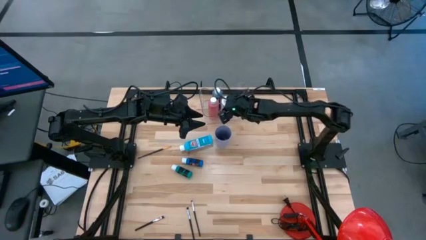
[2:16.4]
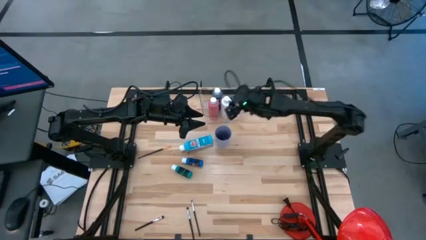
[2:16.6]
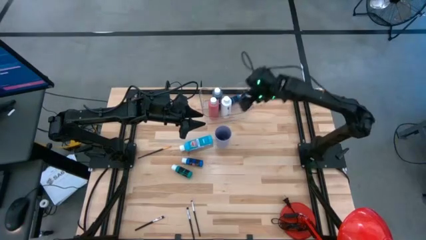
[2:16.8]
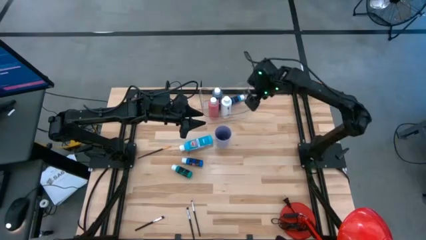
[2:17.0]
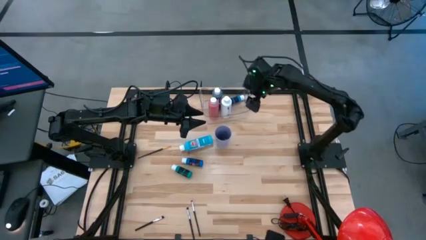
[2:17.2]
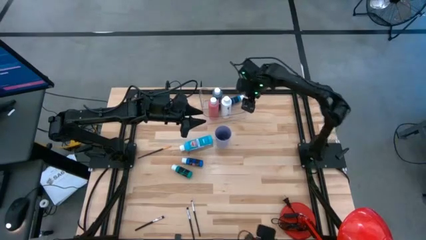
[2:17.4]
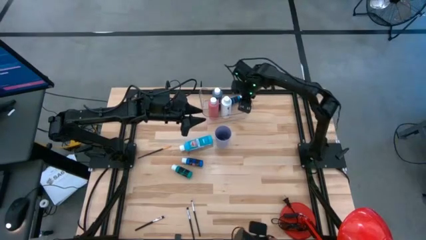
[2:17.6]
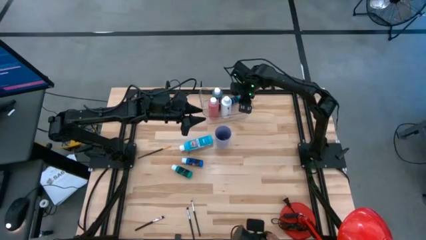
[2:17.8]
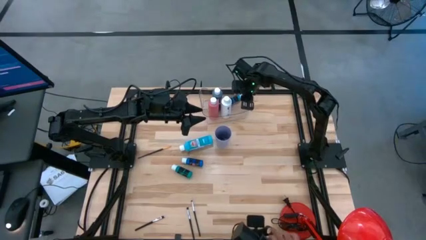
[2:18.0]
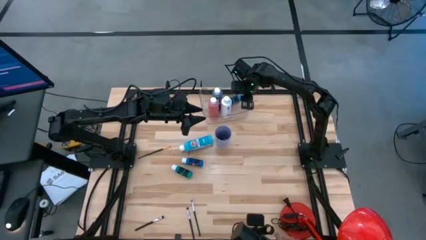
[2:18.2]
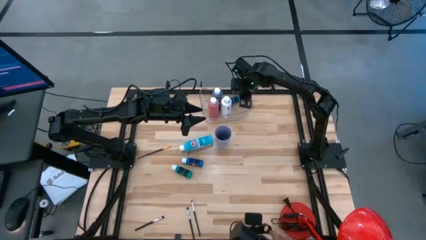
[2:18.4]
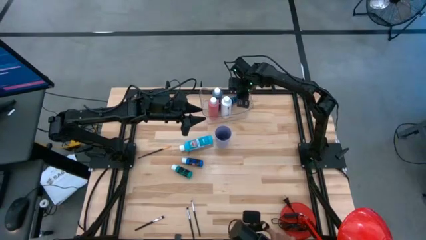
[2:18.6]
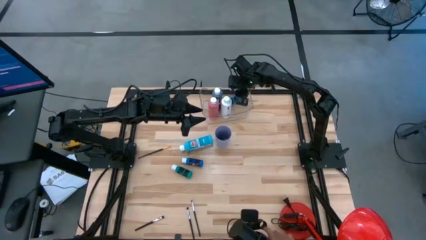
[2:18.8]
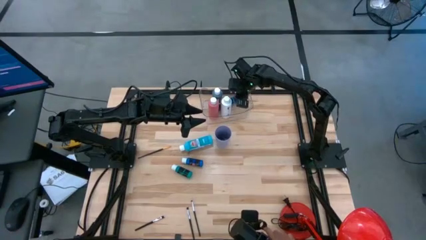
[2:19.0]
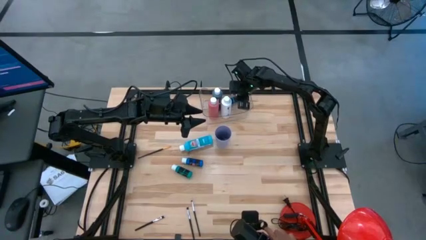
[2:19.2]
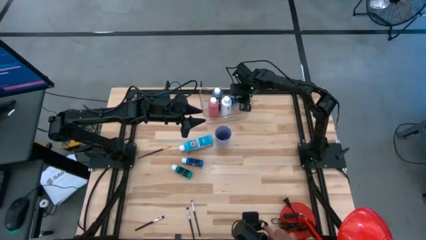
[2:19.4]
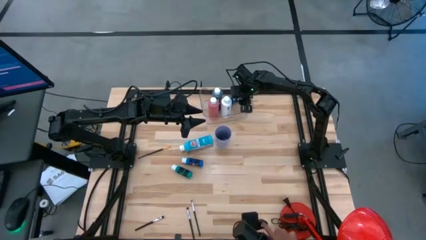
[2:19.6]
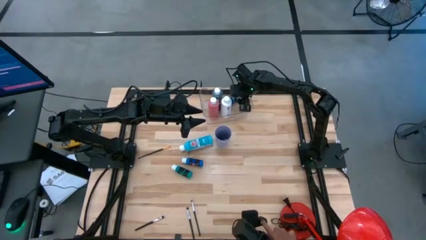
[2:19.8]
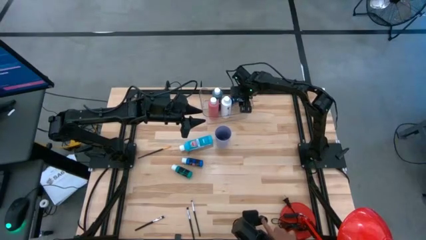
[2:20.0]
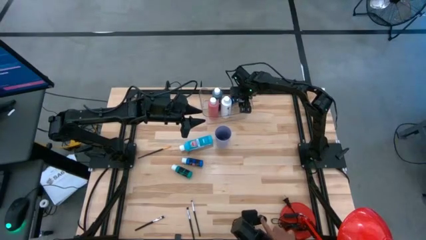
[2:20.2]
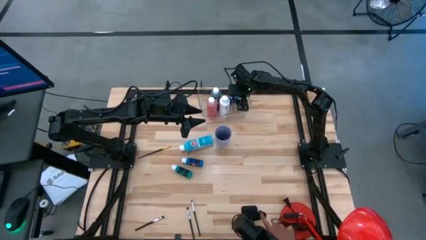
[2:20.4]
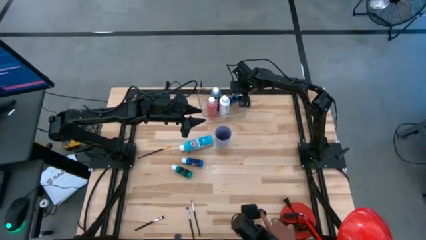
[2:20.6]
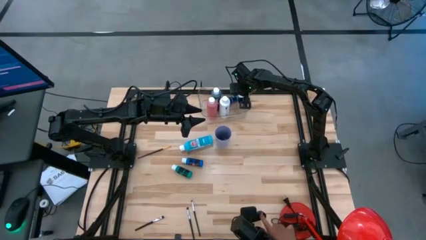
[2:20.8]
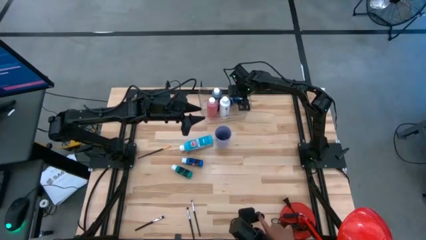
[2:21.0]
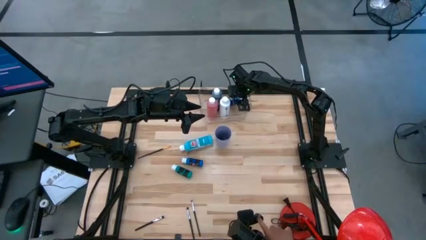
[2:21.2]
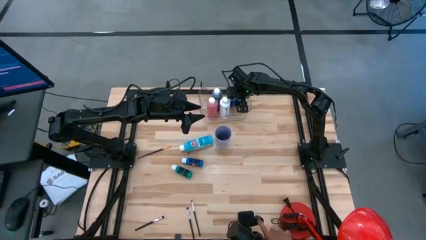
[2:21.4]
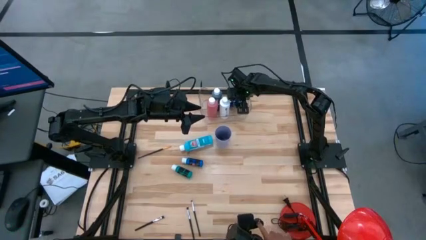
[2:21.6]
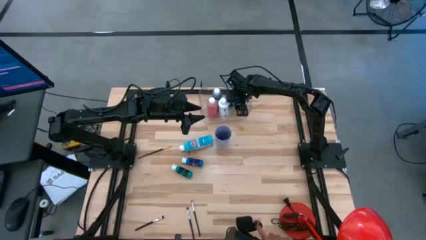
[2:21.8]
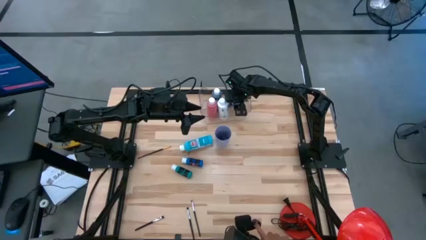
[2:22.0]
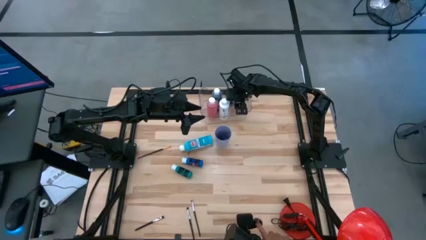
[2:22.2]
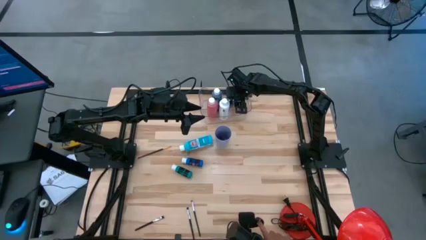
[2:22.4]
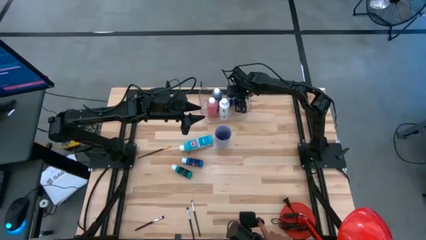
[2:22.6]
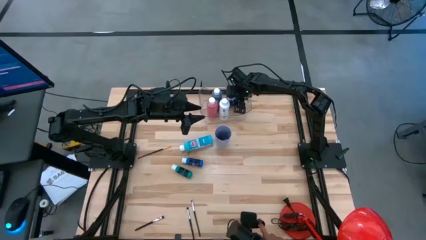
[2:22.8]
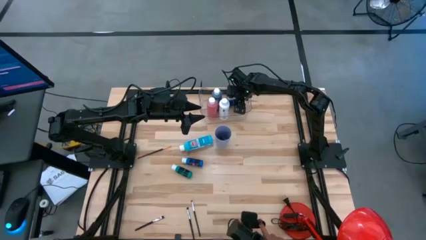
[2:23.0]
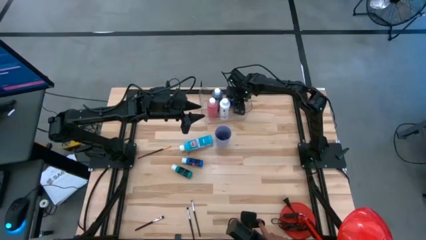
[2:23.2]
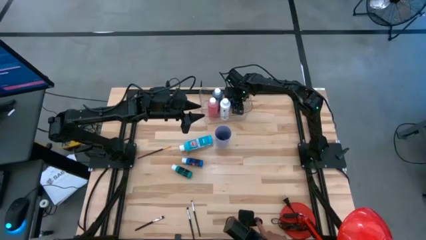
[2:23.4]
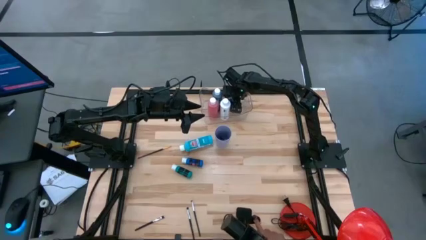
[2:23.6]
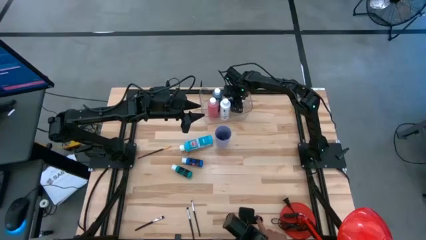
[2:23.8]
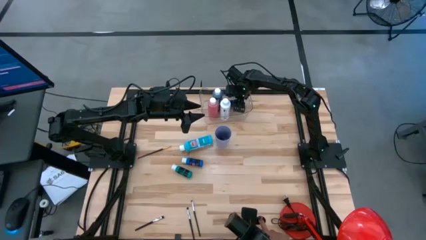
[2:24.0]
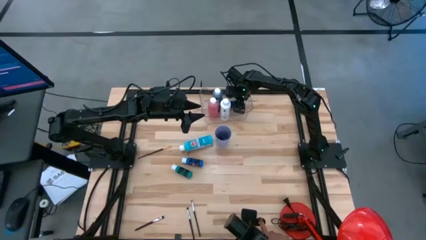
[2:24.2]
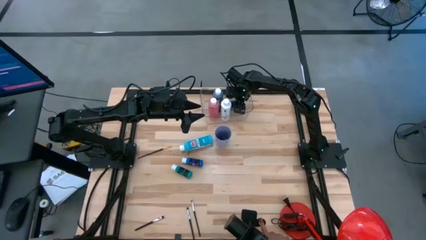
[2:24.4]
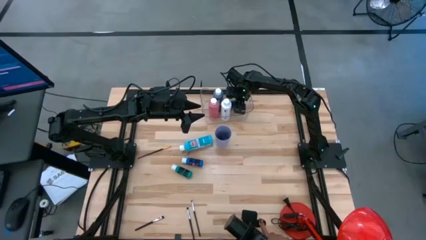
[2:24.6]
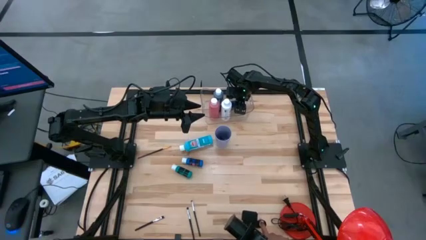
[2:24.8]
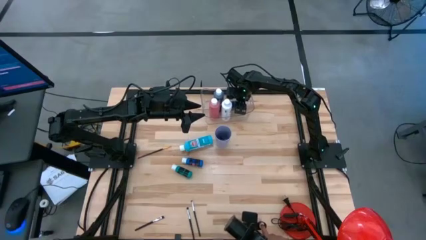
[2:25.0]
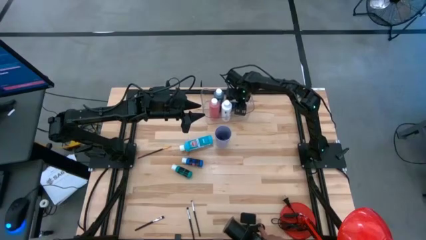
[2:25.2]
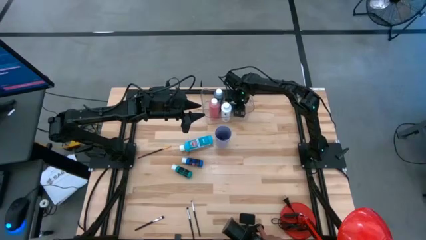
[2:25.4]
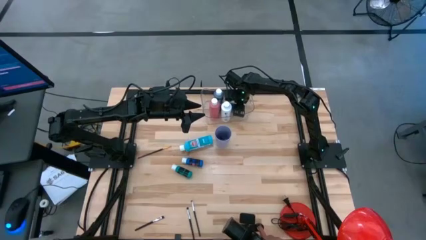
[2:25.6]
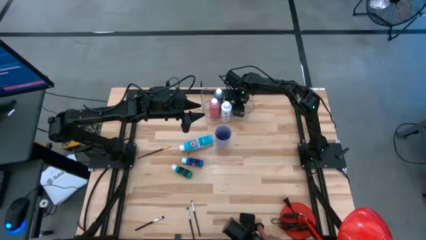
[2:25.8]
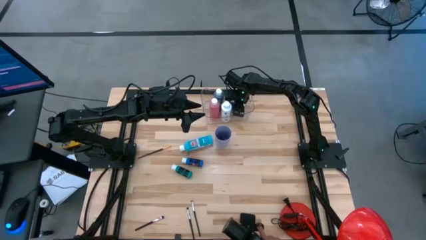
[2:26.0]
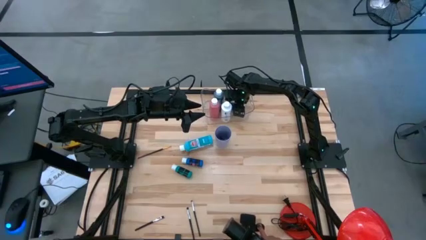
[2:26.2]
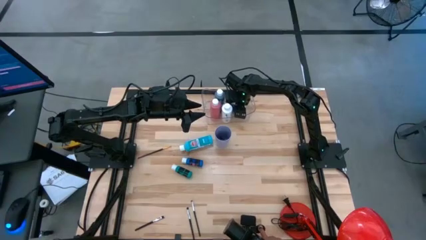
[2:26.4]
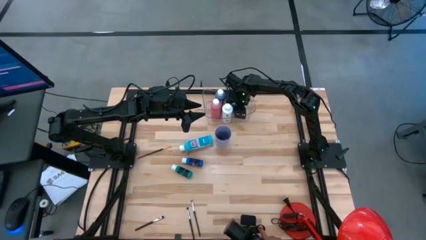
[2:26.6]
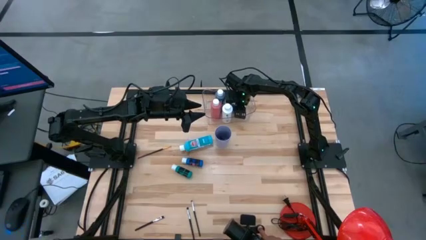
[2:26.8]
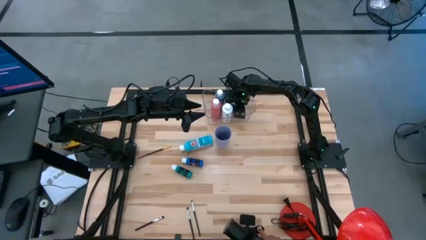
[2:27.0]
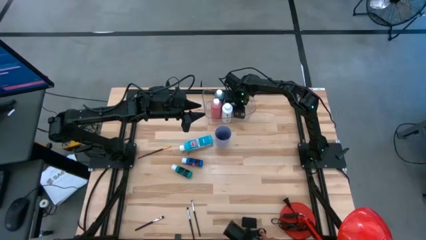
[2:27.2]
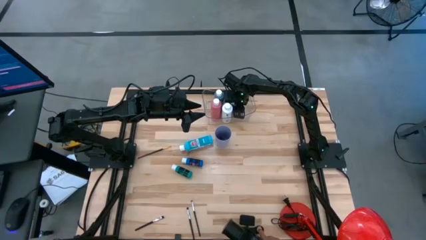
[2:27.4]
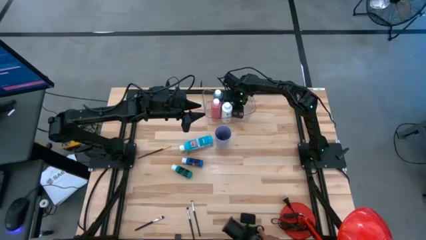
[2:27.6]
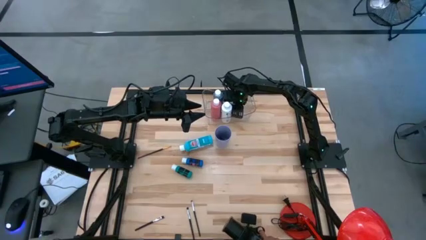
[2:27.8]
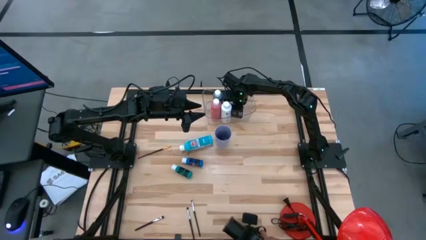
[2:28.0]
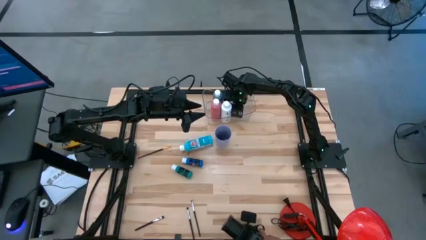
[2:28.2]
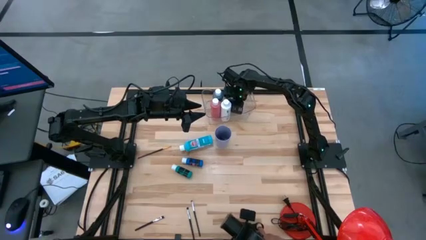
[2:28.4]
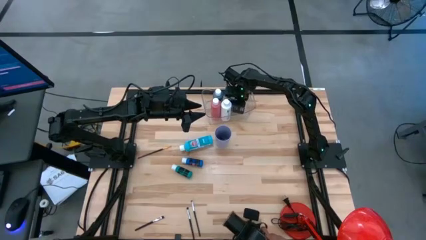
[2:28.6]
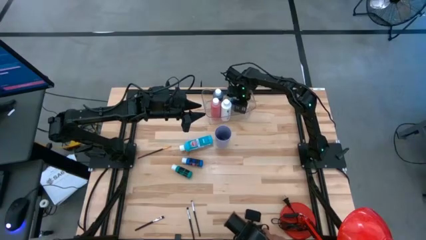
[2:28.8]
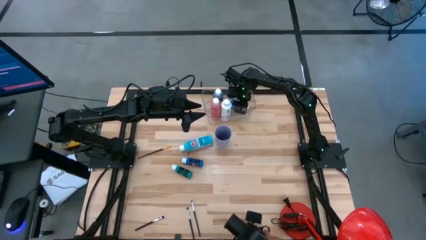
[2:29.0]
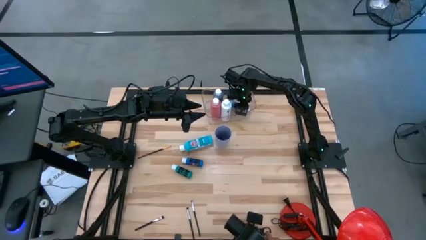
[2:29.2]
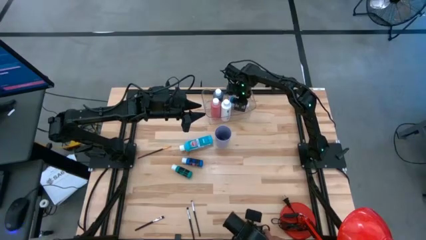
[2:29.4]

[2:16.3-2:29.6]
Task: Pick & Place Paint Supplies
Adjust the blue paint bottle in the transparent bin

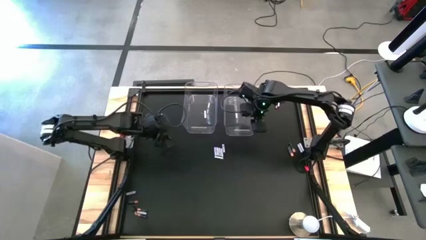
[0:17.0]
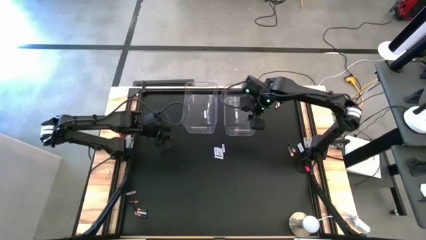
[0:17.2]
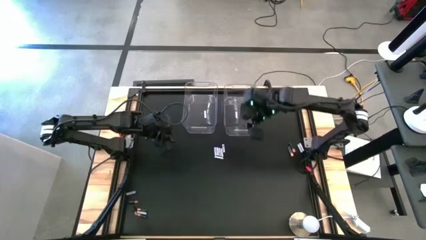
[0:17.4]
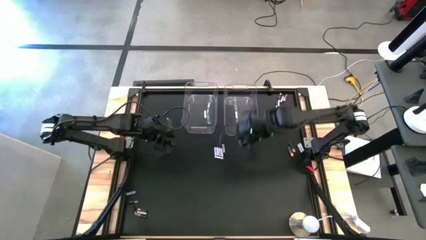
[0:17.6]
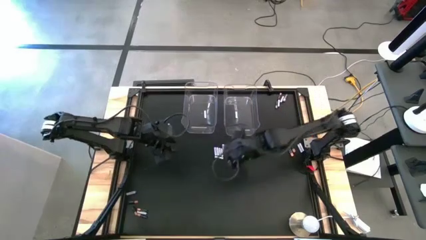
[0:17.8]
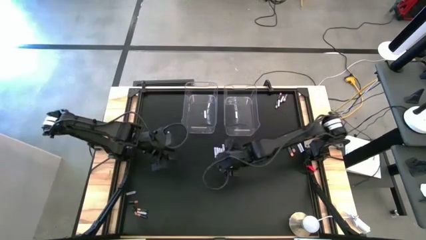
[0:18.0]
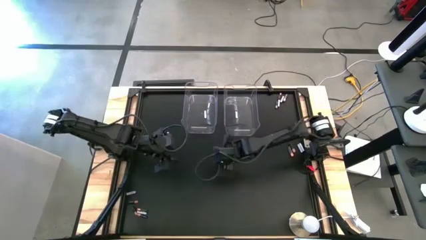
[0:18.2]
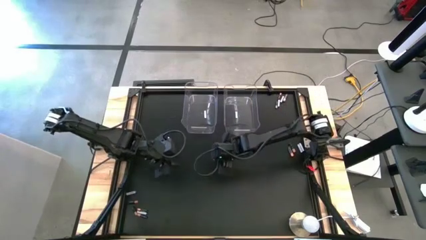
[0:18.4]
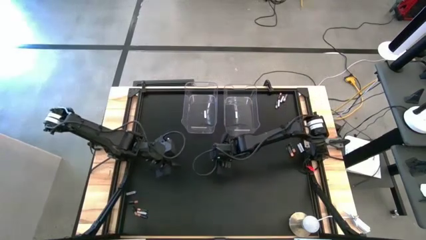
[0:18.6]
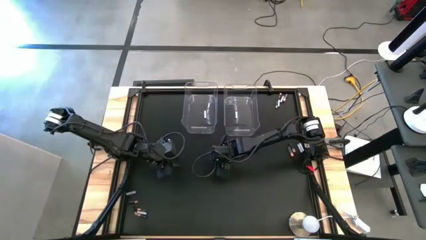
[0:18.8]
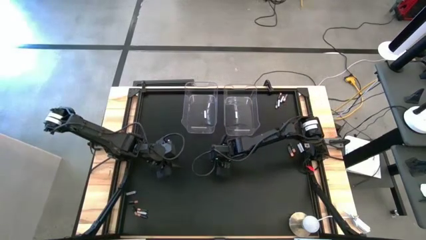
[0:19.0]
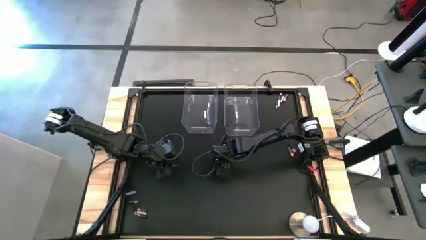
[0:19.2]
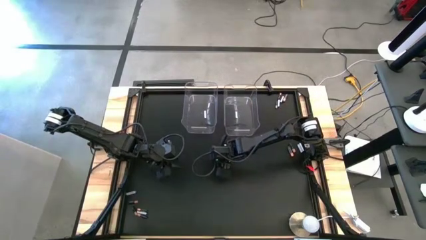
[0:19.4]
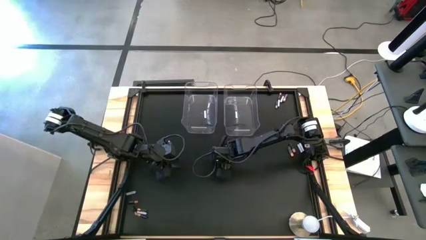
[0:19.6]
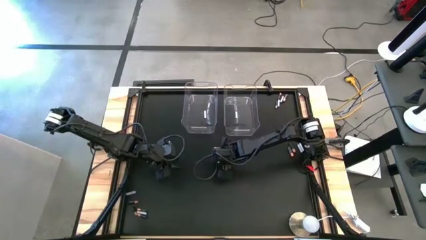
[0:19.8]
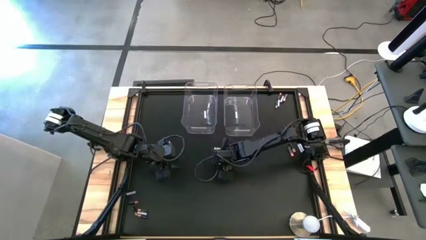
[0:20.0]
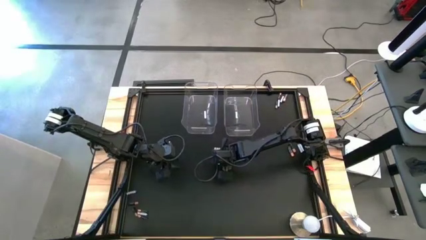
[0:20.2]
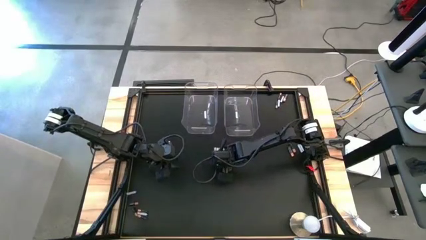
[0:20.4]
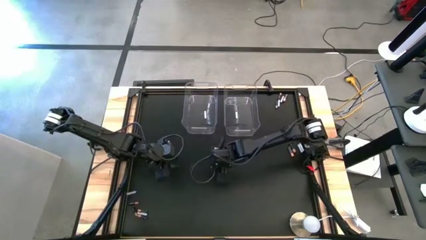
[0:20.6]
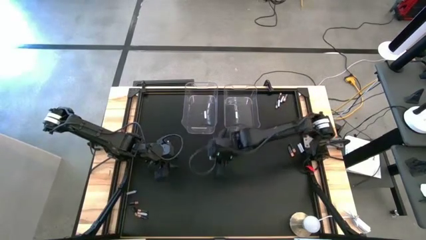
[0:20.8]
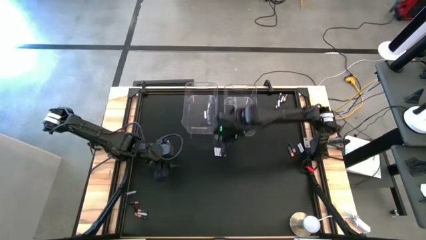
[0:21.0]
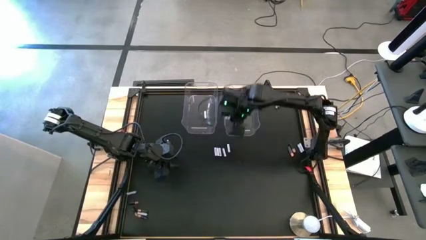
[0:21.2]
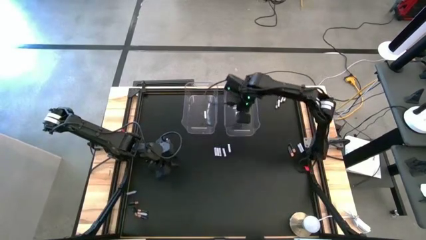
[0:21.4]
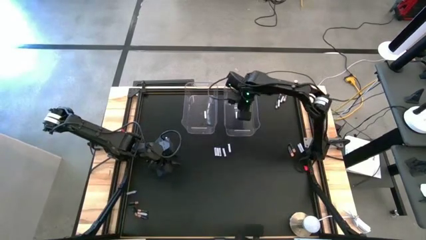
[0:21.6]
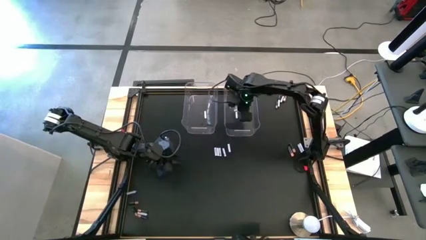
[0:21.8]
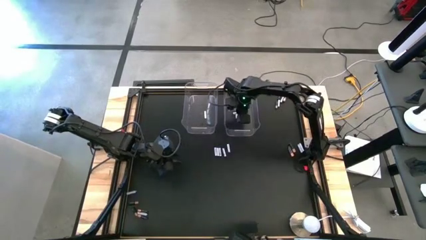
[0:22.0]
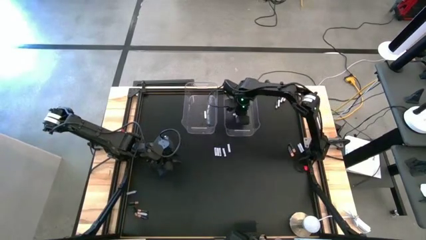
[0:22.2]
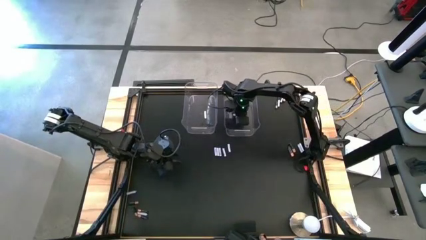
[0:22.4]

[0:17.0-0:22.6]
Task: Sort batteries
Put the white battery into the right transparent bin
